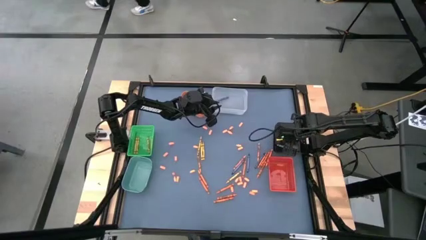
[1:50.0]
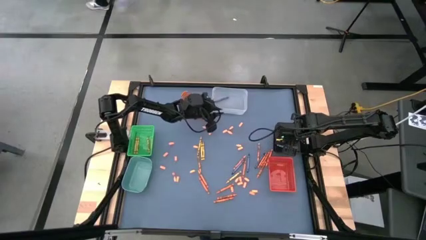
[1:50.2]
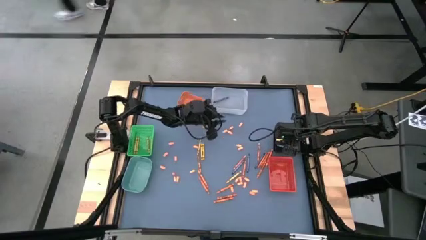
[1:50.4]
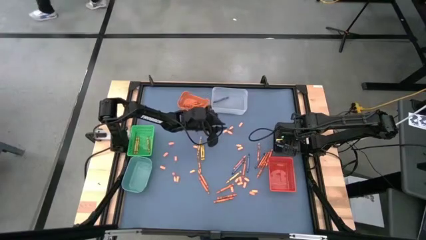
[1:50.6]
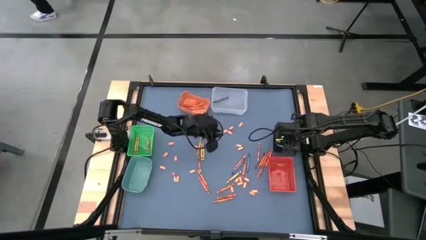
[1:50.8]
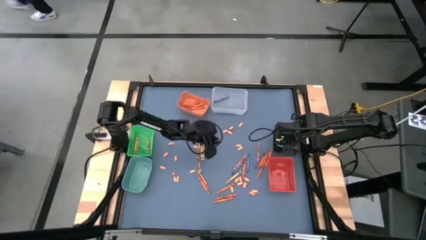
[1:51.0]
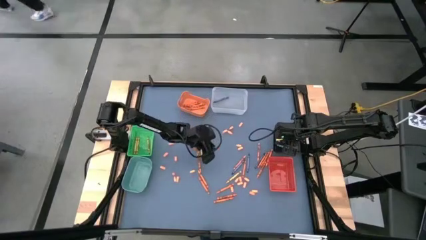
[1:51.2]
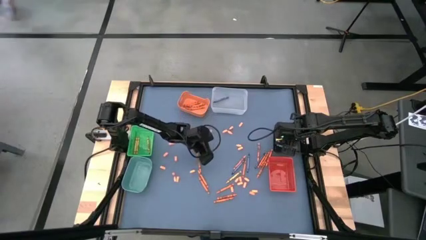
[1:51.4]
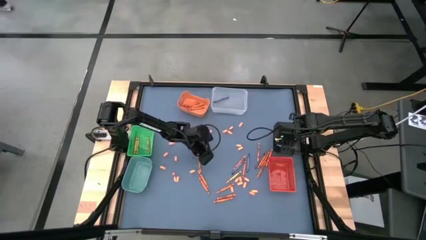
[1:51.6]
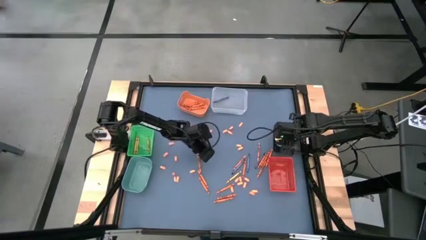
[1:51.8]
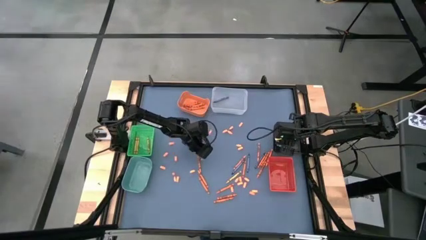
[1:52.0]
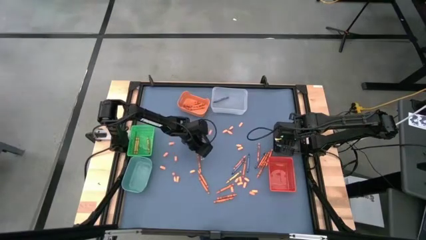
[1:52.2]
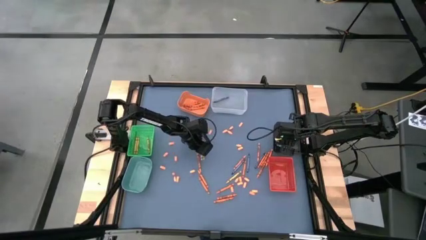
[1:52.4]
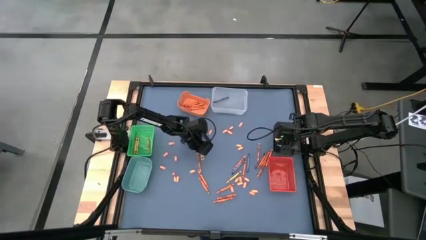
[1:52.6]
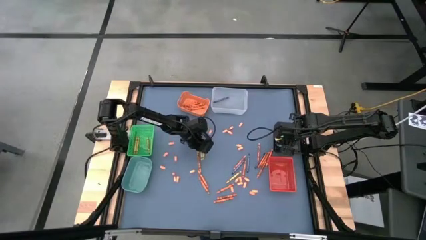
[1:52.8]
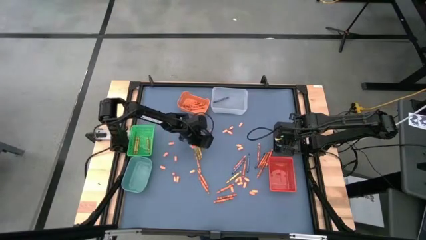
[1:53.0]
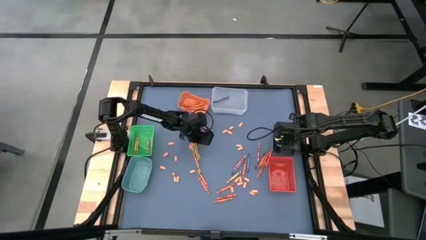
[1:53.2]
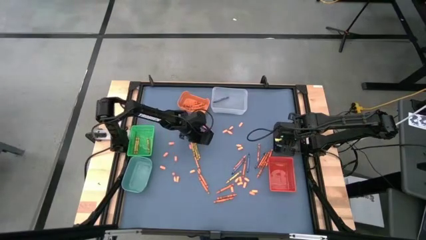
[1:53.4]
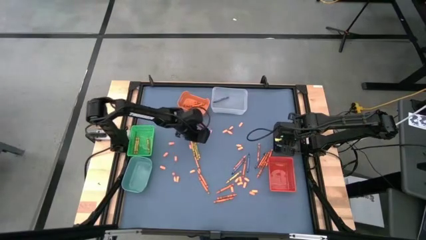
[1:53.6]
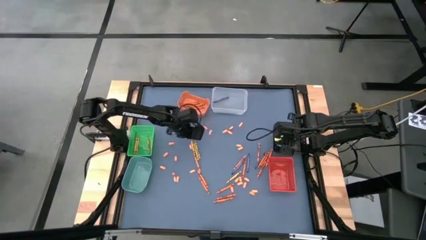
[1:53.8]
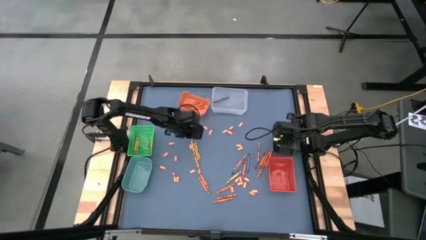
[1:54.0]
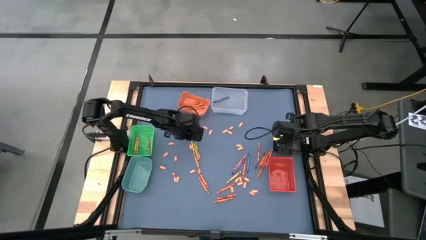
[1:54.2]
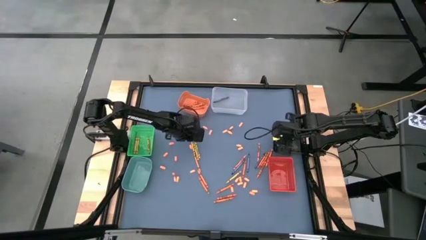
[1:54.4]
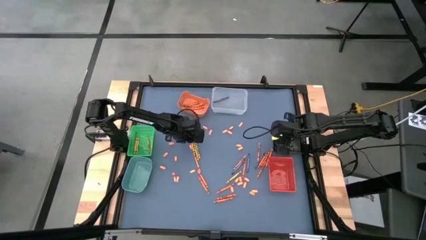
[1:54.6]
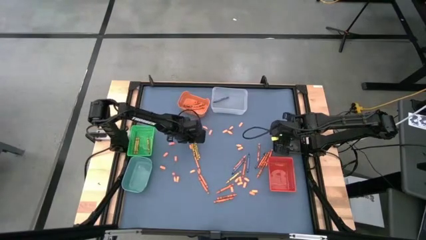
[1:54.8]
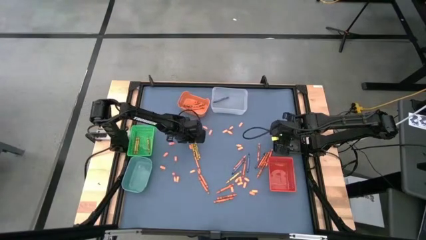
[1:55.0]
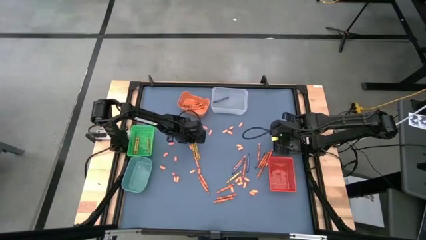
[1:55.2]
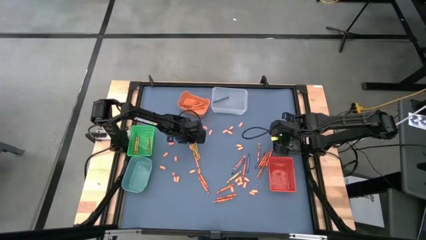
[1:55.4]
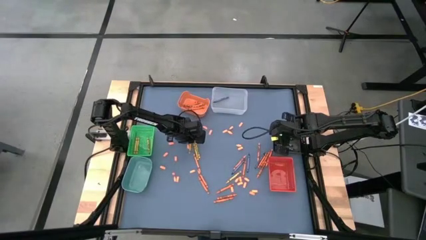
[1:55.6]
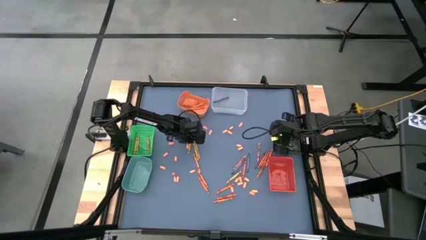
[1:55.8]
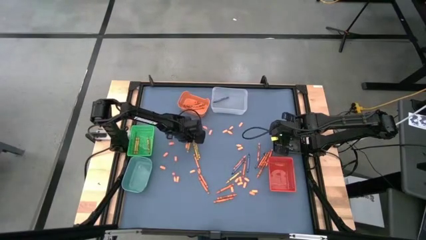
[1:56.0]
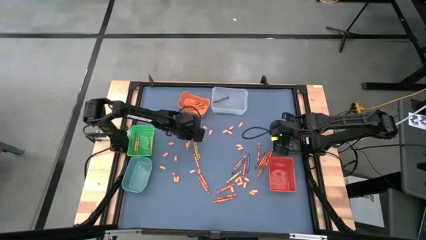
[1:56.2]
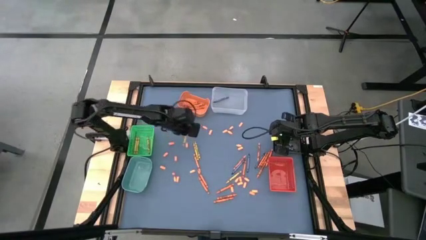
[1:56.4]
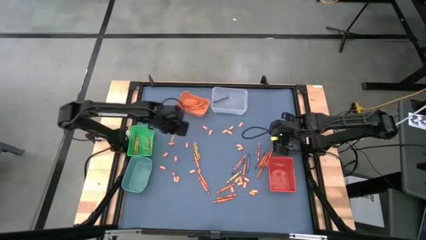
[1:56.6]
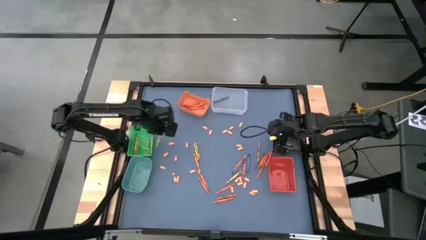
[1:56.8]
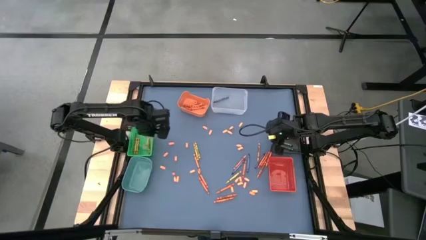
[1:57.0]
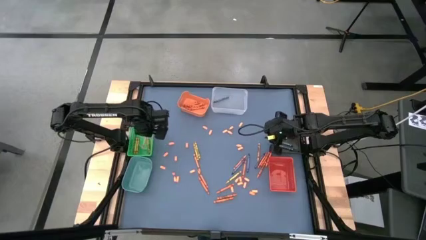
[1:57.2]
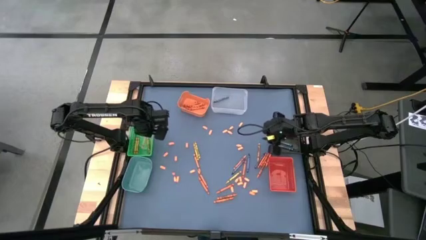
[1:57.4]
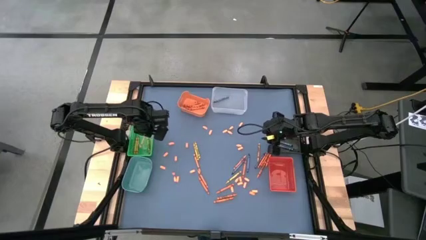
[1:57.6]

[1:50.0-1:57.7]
Task: Sort crayons
Put the yellow crayon into the green bin

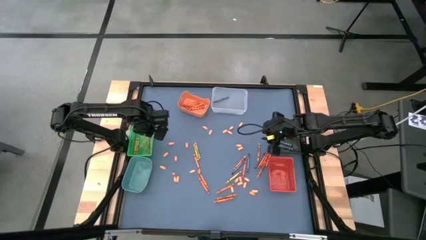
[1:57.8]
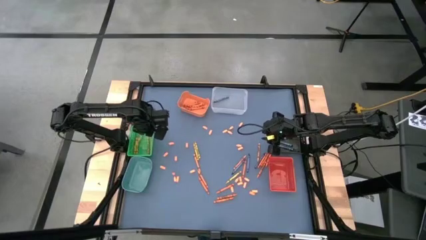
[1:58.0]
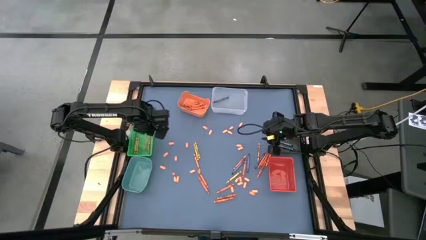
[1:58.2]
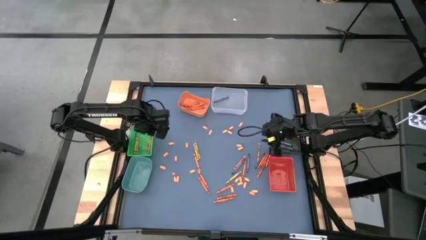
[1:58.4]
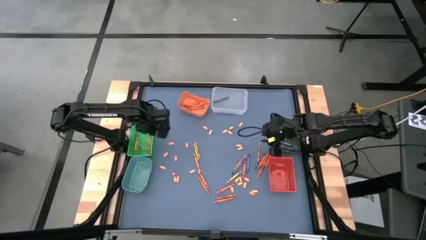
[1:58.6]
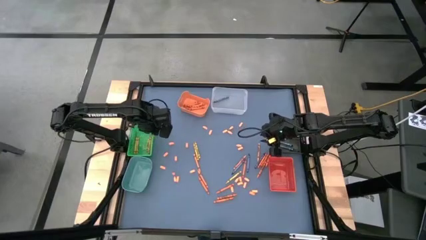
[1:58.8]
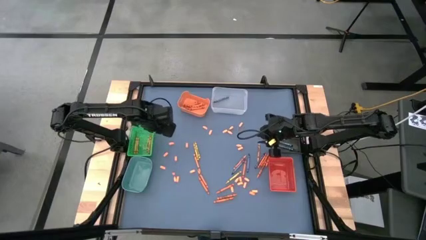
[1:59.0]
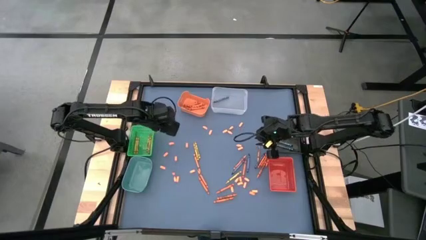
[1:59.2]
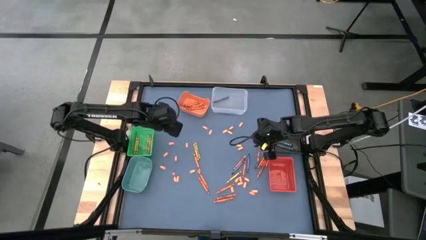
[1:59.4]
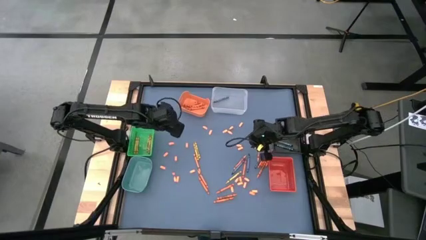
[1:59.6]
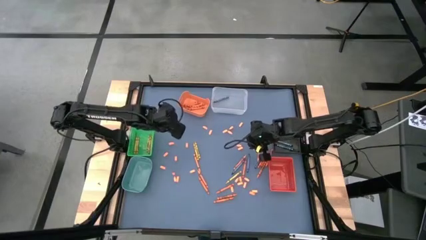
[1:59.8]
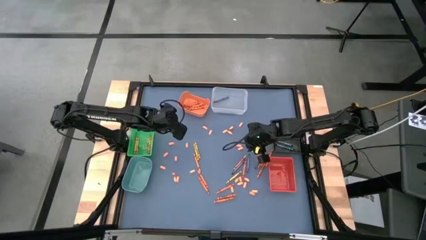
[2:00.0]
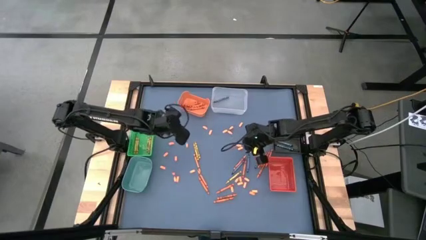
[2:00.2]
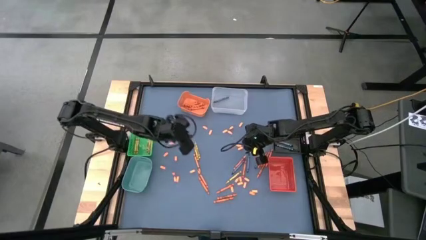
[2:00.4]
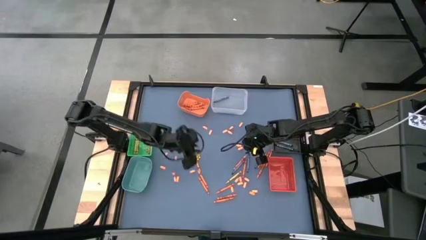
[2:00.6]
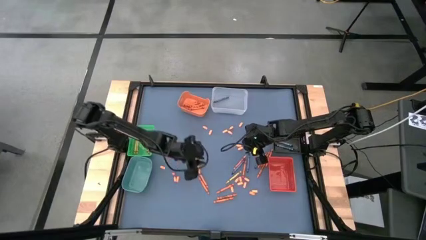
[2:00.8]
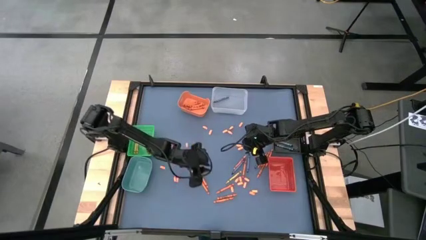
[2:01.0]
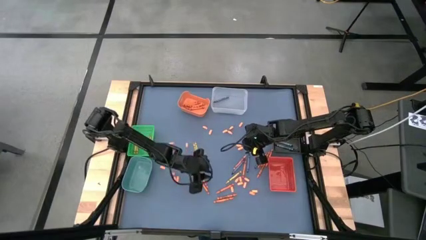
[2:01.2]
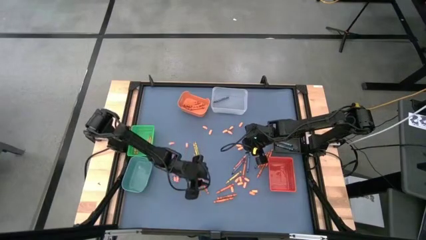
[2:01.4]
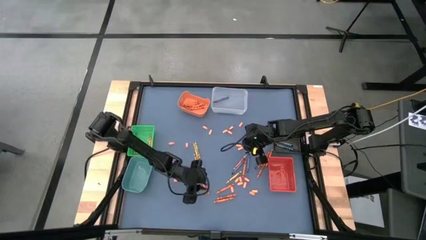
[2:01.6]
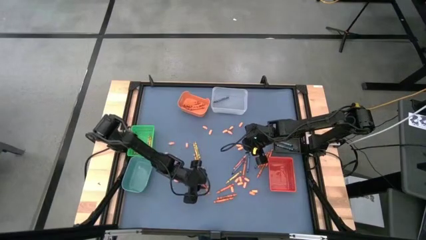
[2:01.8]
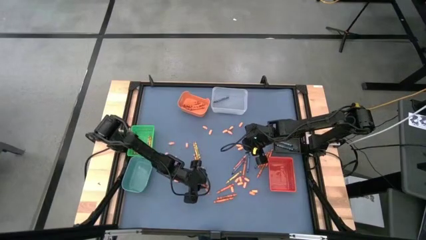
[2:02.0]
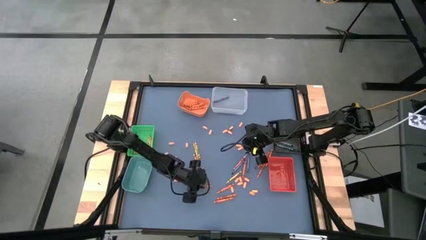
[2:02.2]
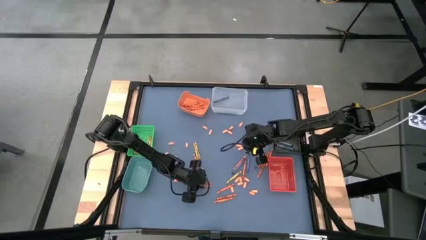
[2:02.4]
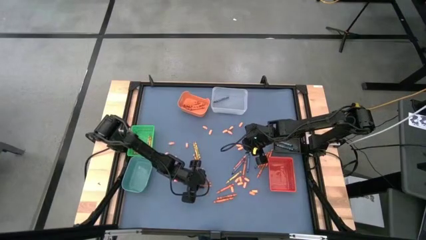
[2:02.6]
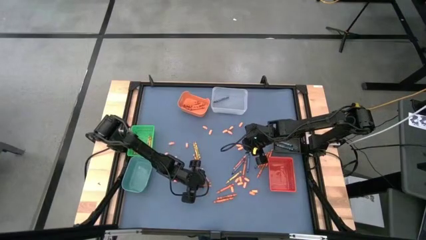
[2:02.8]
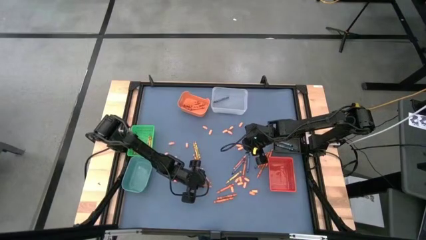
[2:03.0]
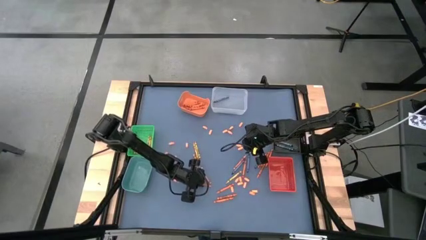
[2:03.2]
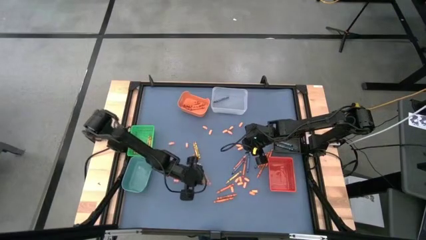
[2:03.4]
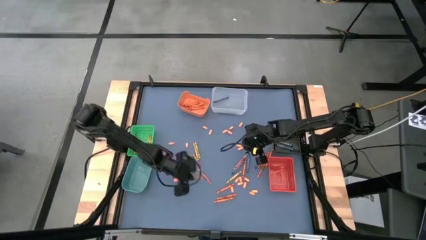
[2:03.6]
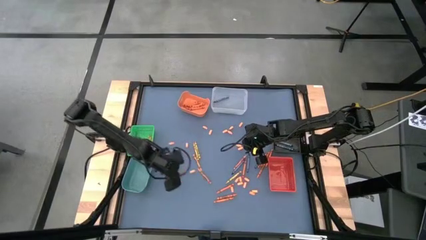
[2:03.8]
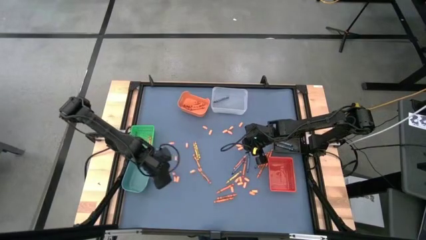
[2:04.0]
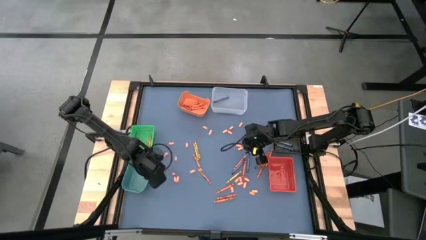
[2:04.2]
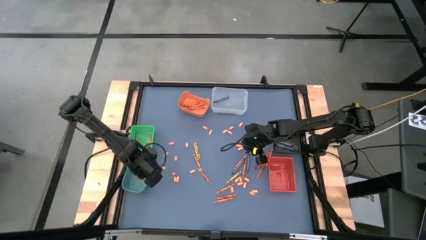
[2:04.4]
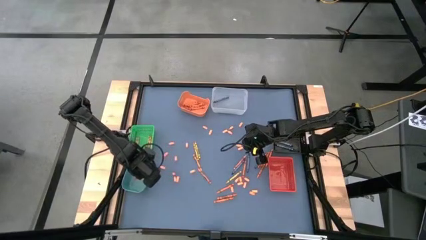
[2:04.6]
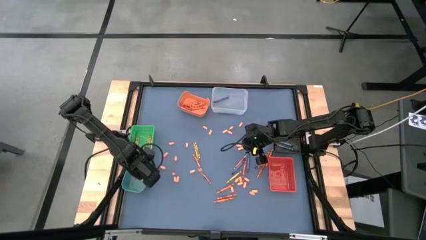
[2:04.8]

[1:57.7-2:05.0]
Put the orange crayon into the blue bin
